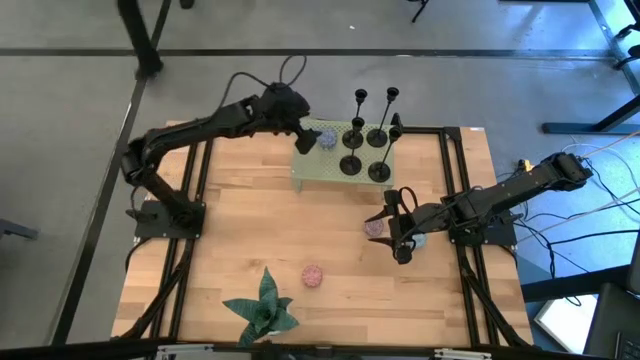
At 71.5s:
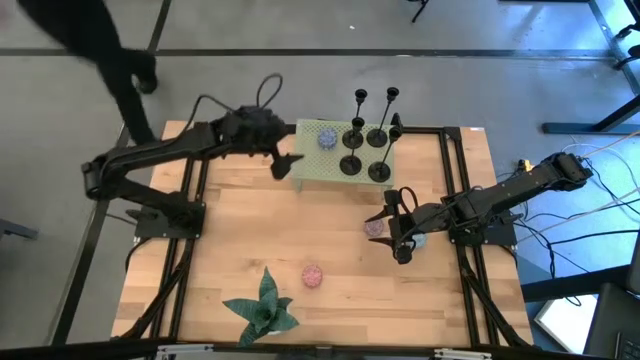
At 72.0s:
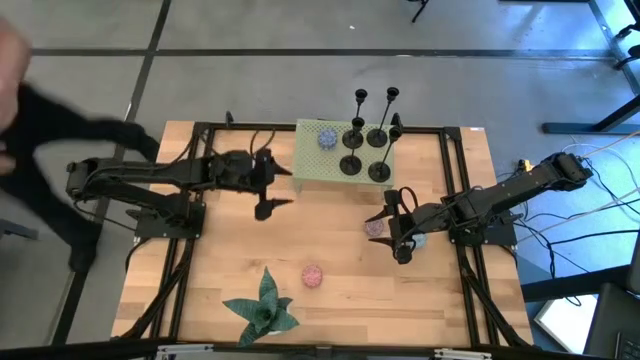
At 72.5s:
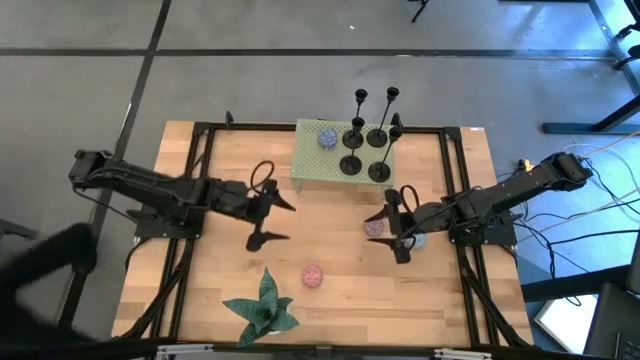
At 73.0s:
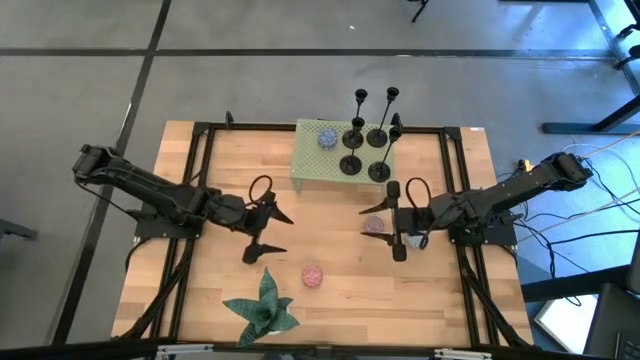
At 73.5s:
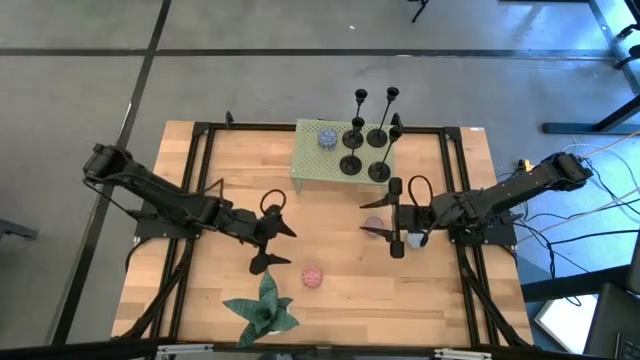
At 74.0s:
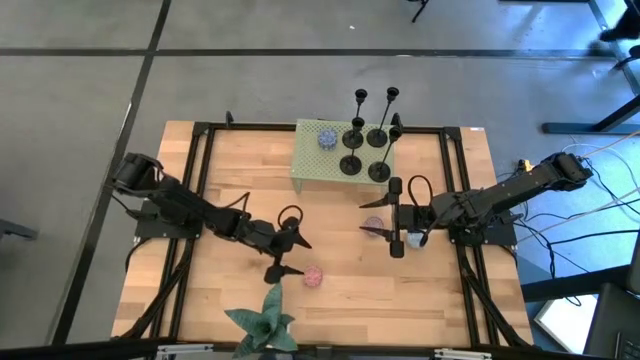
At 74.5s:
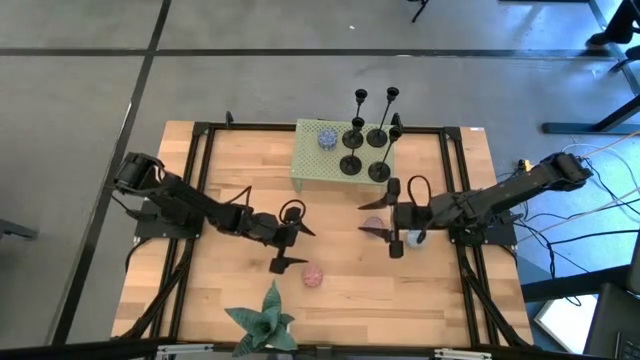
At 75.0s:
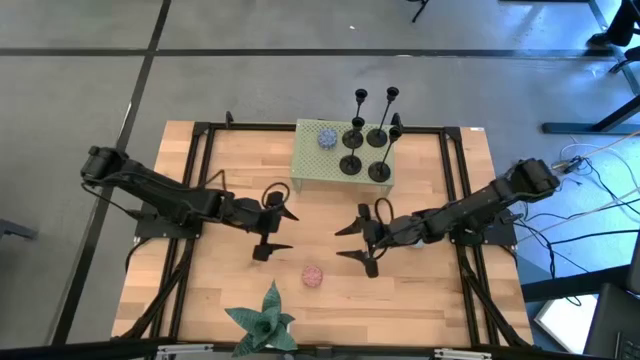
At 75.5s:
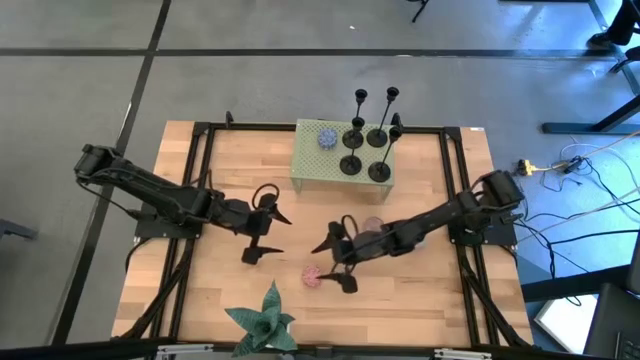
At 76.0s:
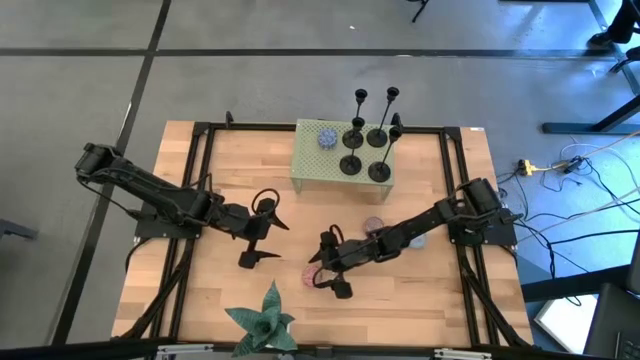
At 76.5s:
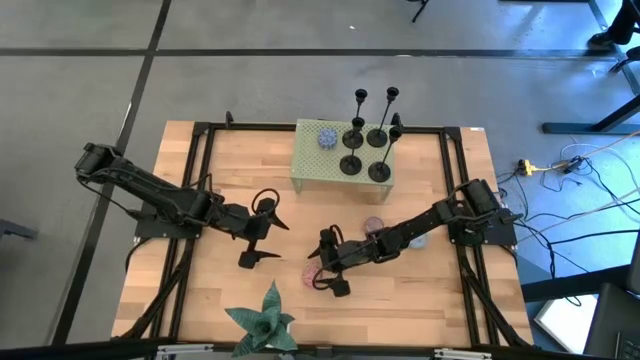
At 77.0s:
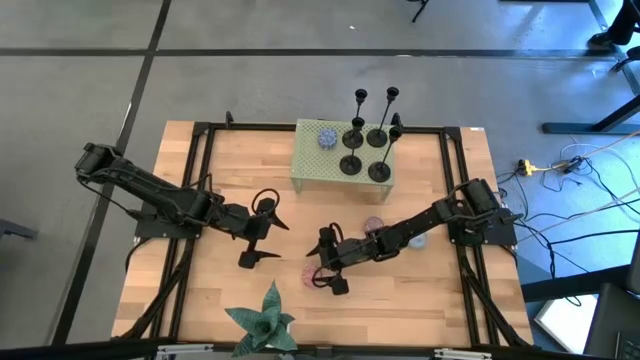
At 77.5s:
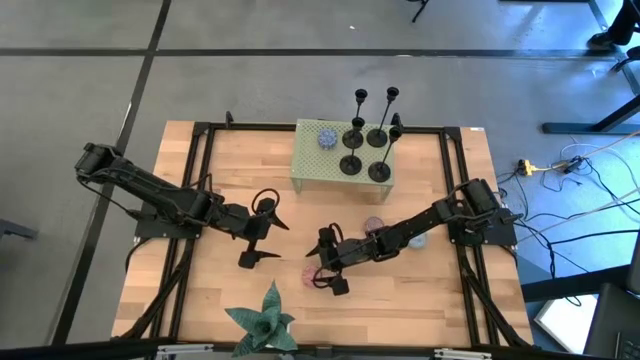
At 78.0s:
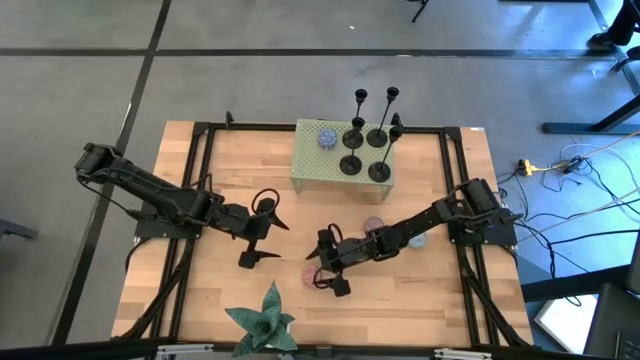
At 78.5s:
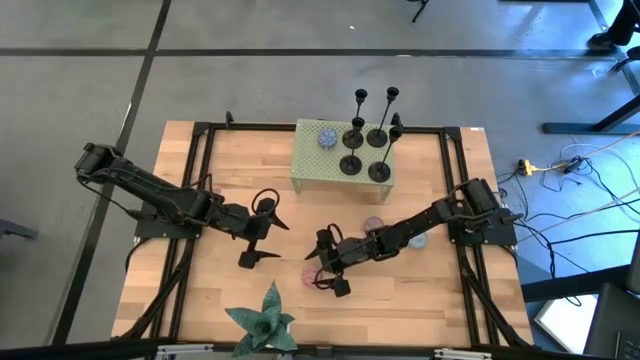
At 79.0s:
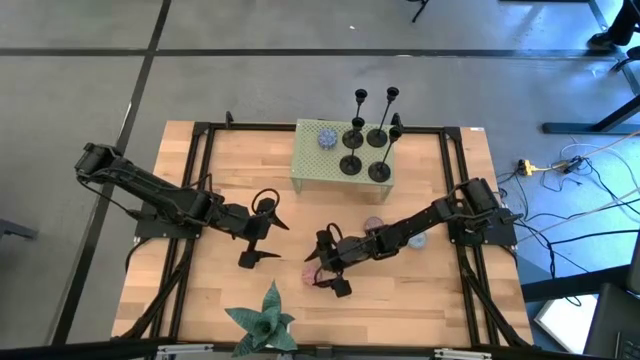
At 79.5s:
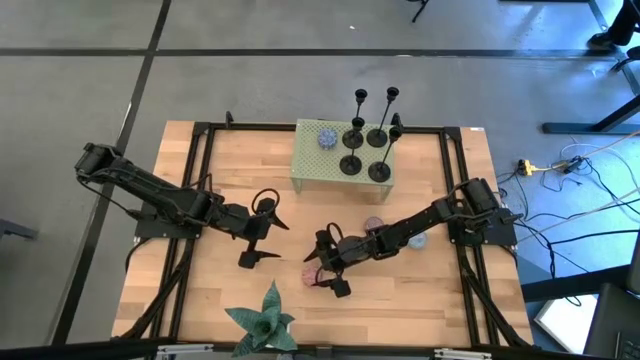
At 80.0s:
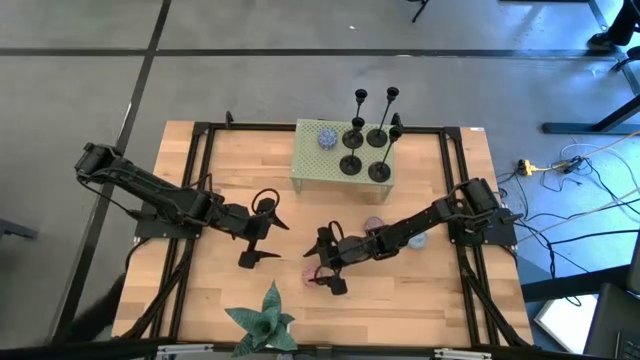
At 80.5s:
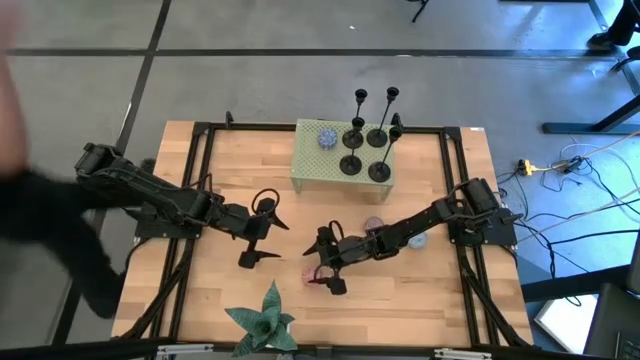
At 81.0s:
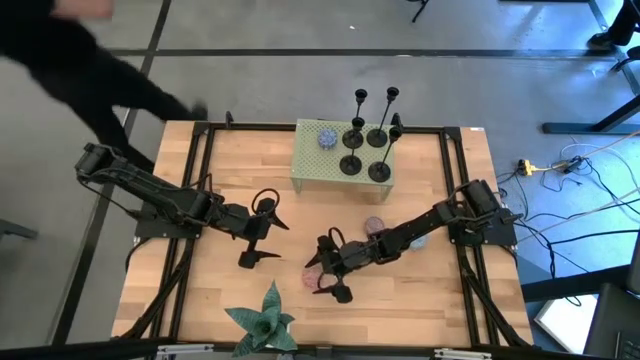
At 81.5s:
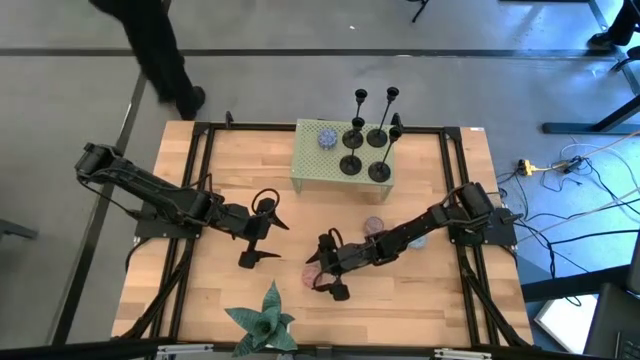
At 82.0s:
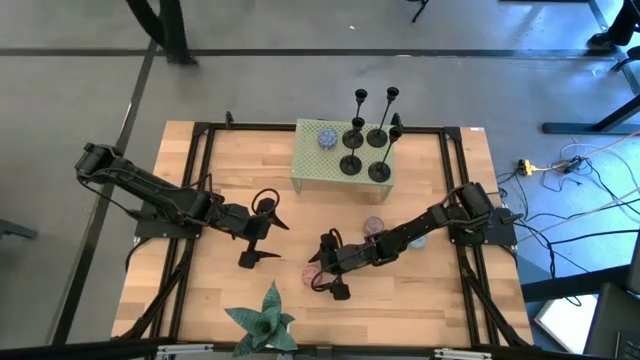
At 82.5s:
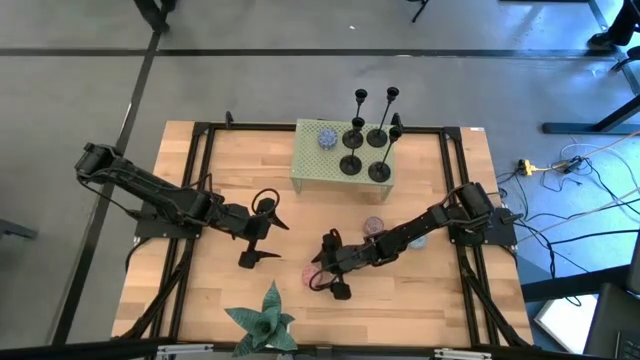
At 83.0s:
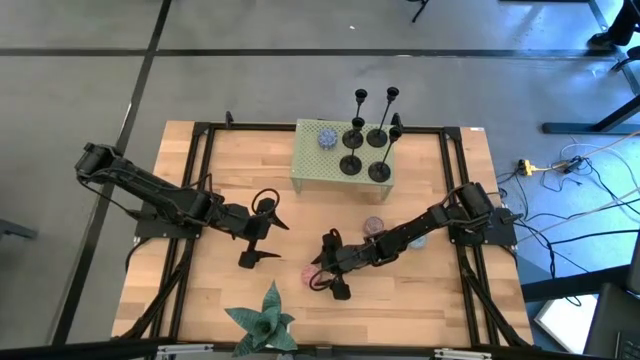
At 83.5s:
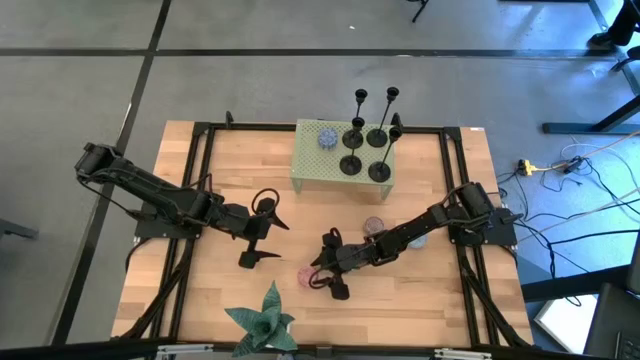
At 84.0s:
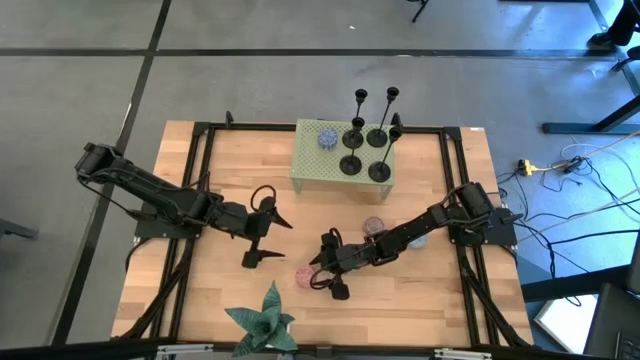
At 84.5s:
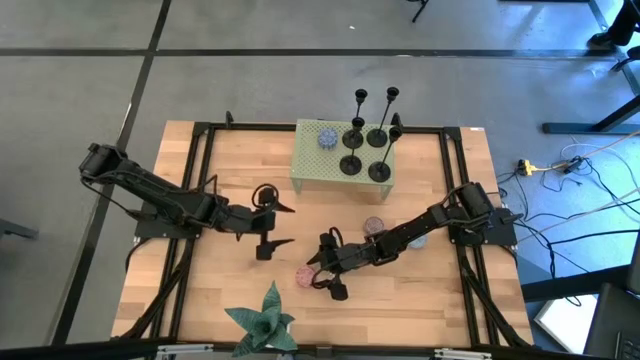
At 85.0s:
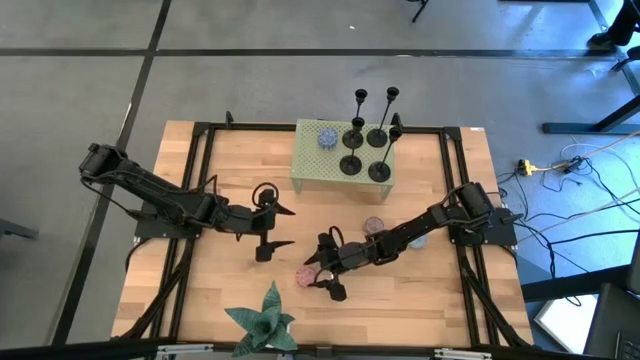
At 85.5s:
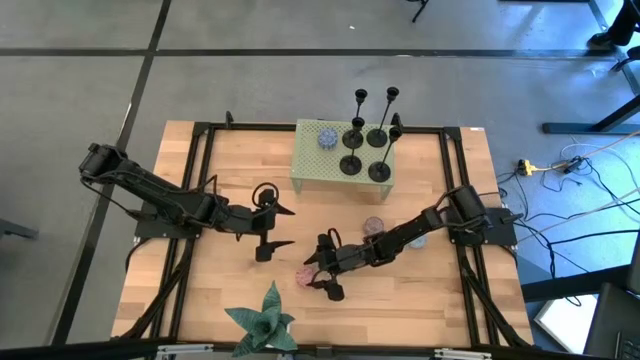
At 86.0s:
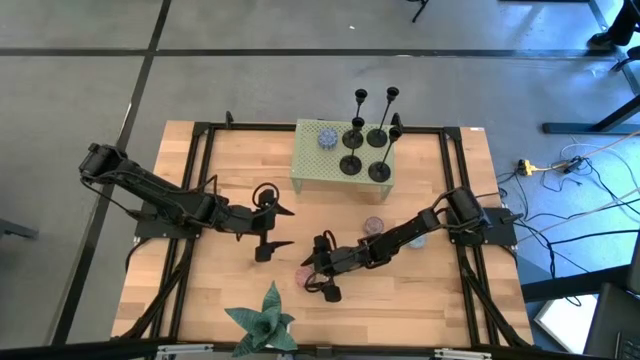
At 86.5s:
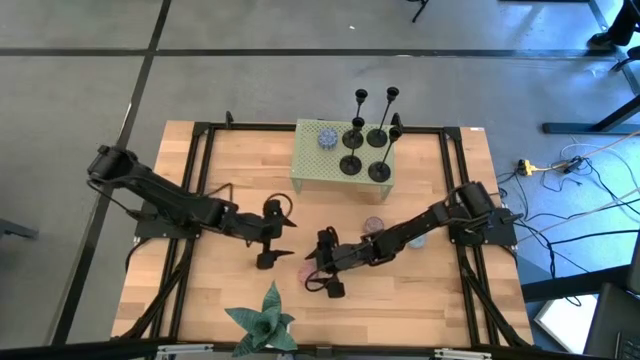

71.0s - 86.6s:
Task: Pick & Place candle stick holders
Put the red scented candle on the shelf

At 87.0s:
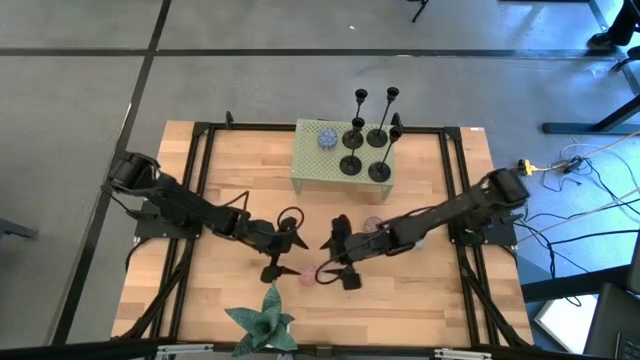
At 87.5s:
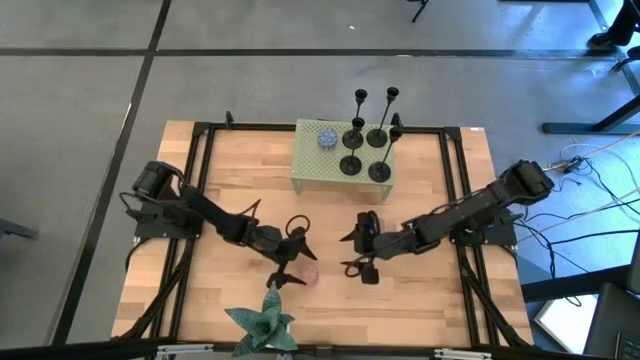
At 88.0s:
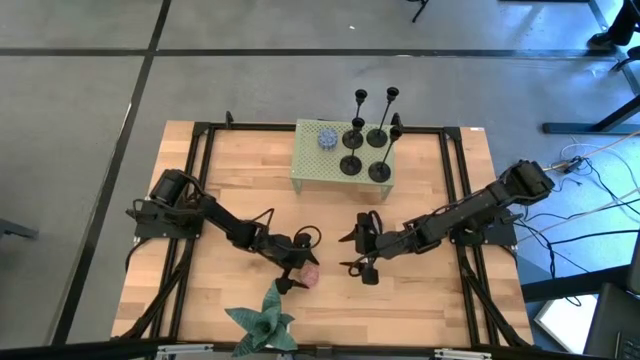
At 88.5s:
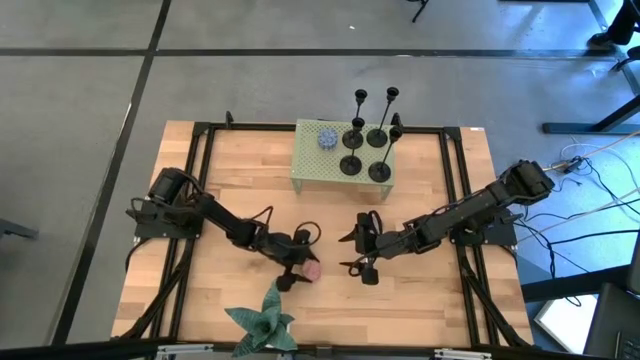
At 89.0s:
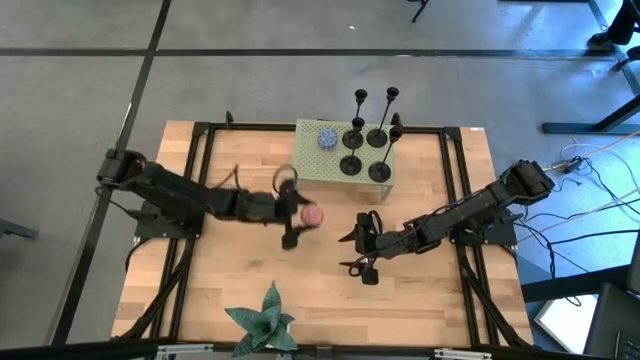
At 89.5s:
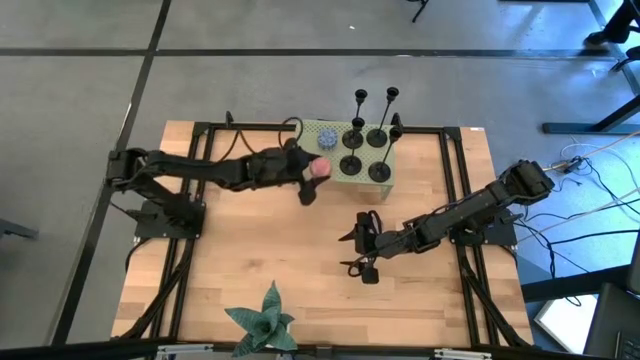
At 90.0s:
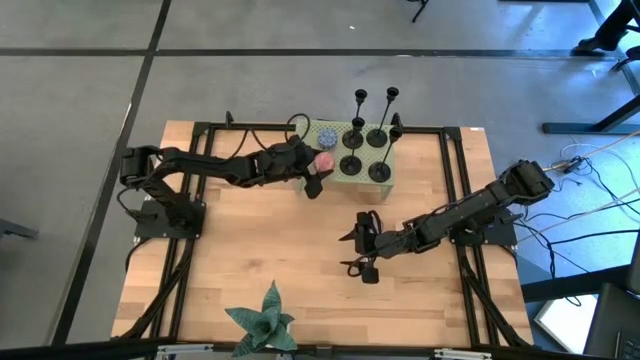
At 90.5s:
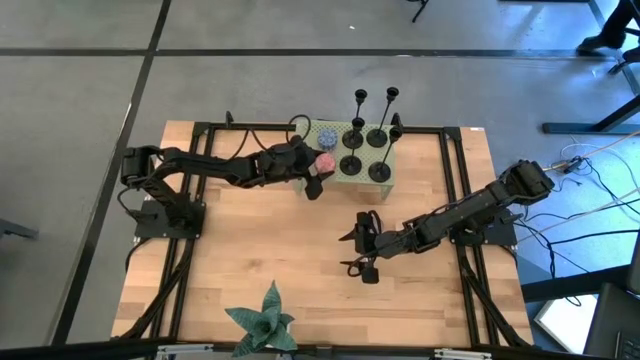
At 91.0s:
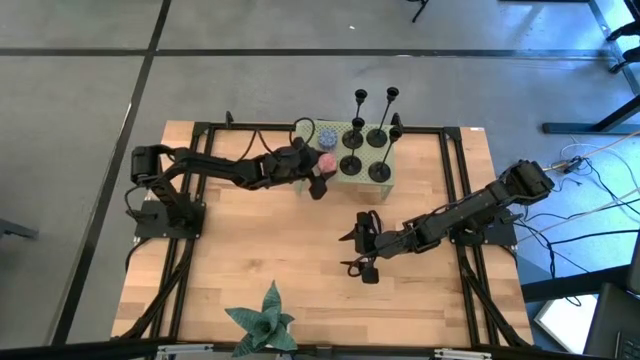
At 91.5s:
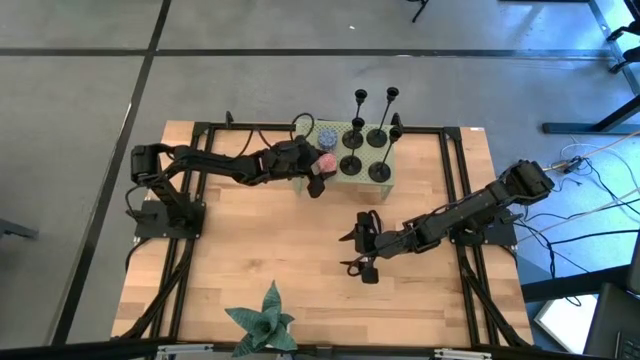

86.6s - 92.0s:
Put the red scented candle on the shelf

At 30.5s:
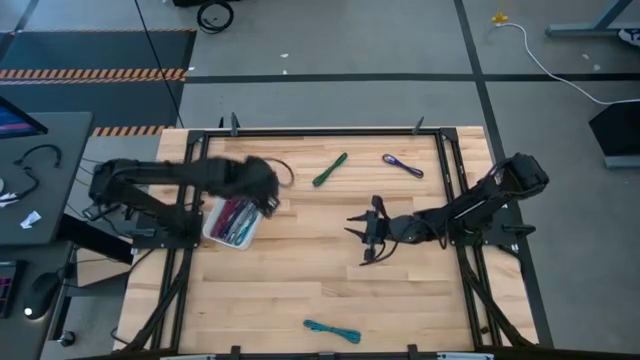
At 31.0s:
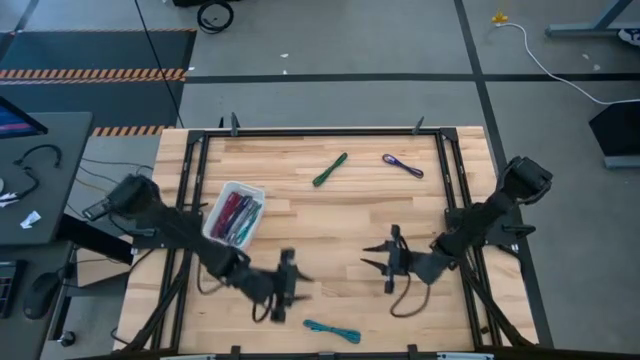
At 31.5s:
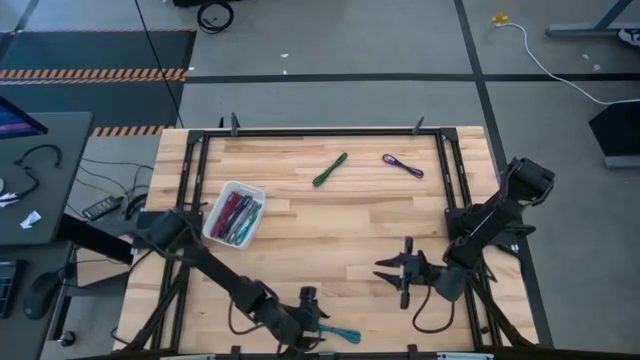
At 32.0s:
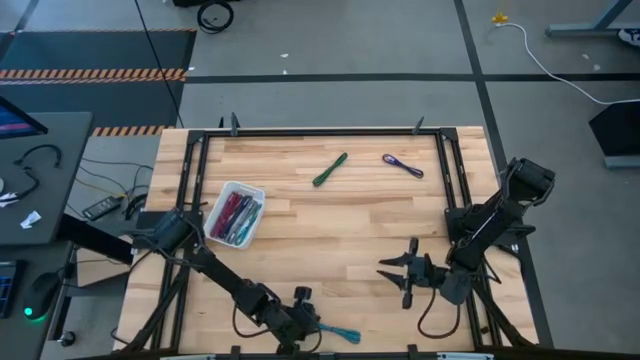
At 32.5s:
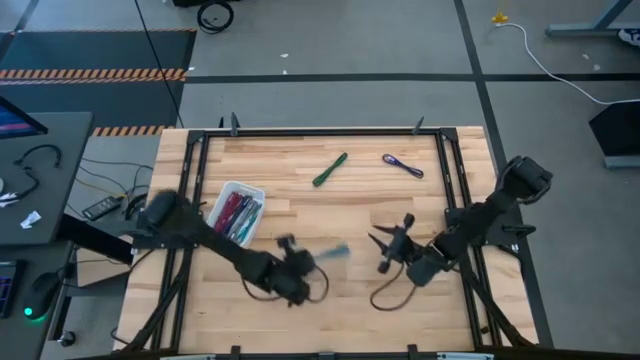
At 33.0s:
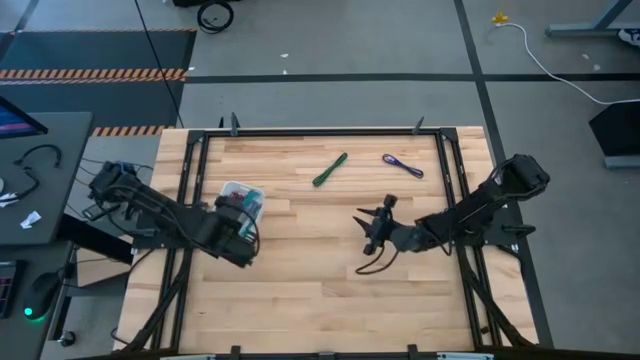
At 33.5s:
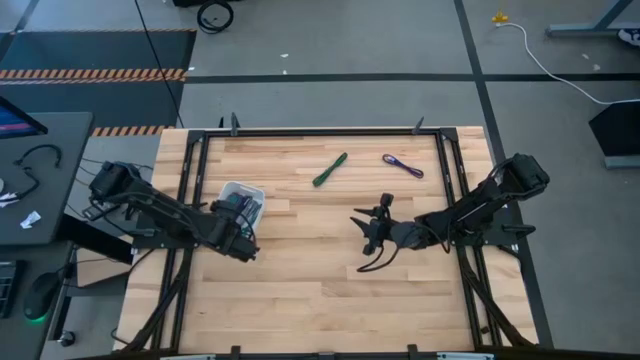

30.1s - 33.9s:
Task: Pick and place USB-C Cables
Put the blue charger cable into the white bin
